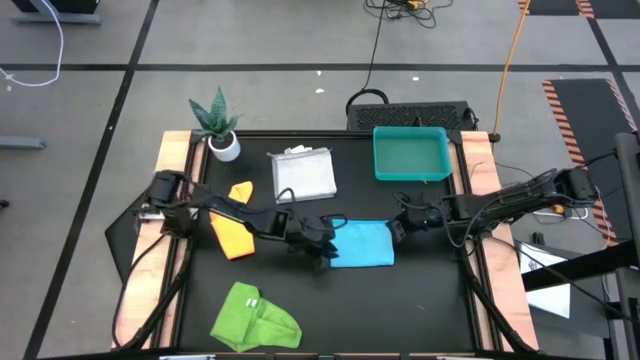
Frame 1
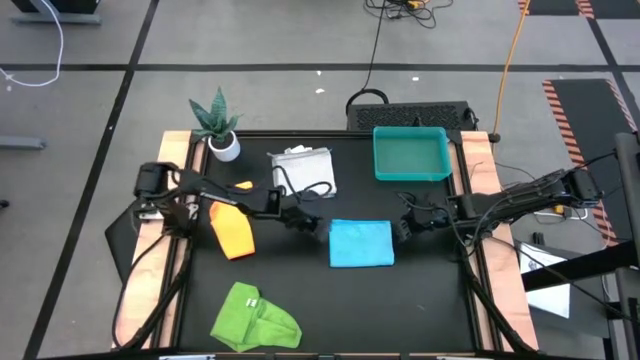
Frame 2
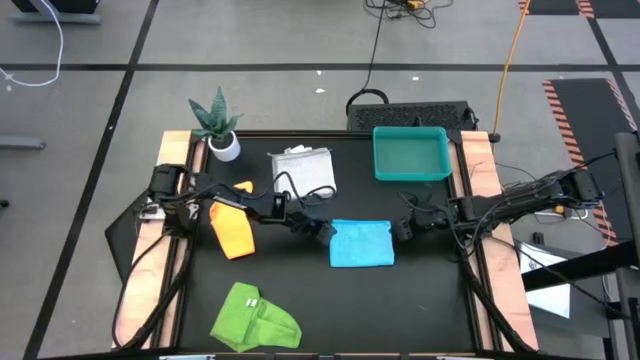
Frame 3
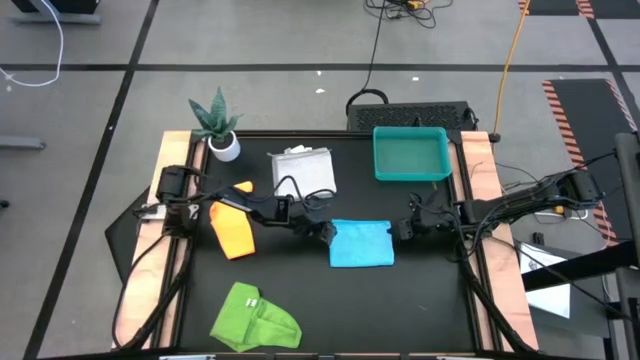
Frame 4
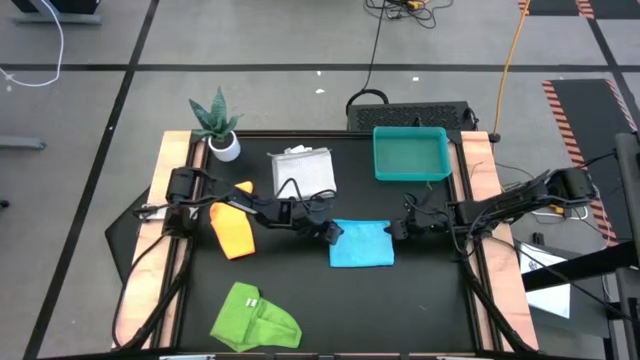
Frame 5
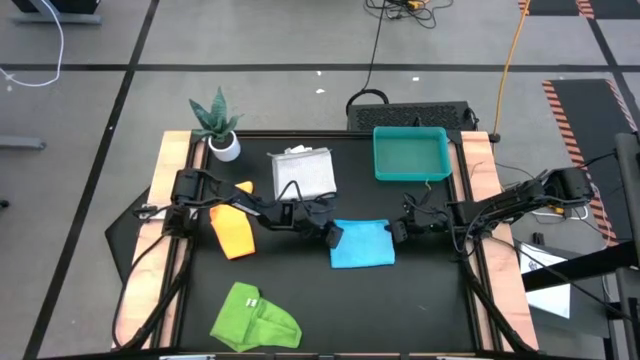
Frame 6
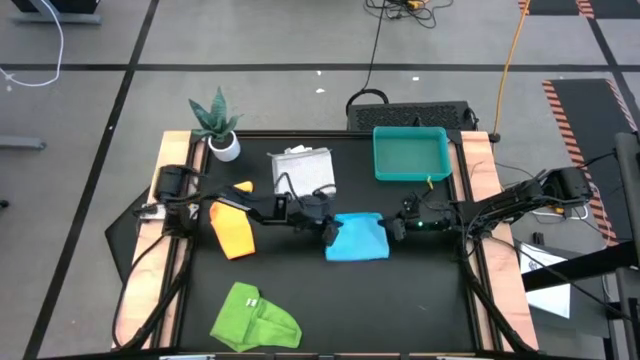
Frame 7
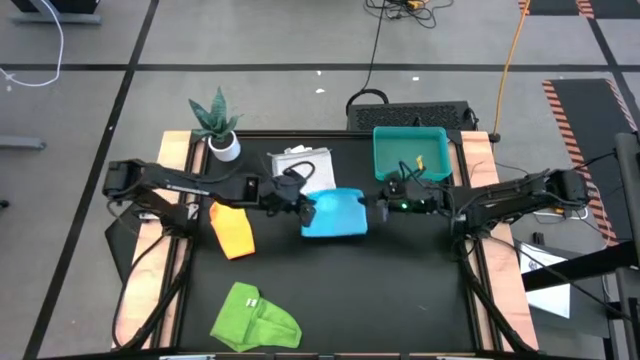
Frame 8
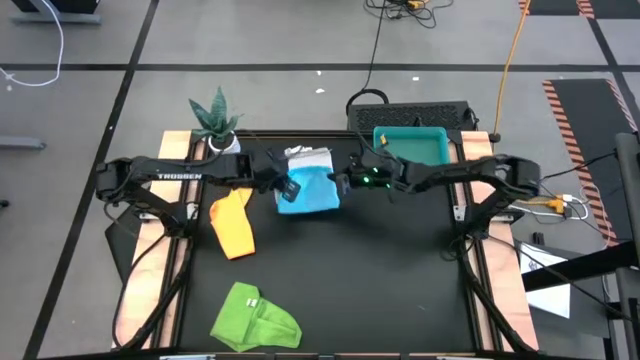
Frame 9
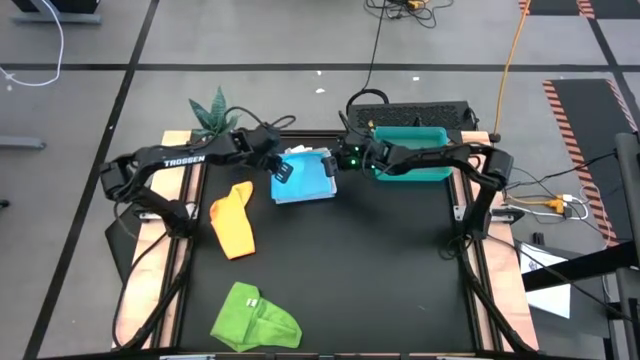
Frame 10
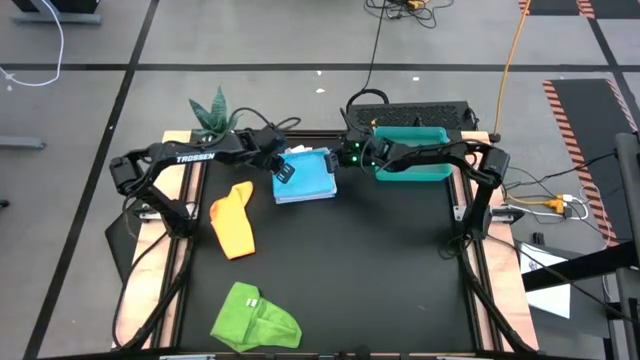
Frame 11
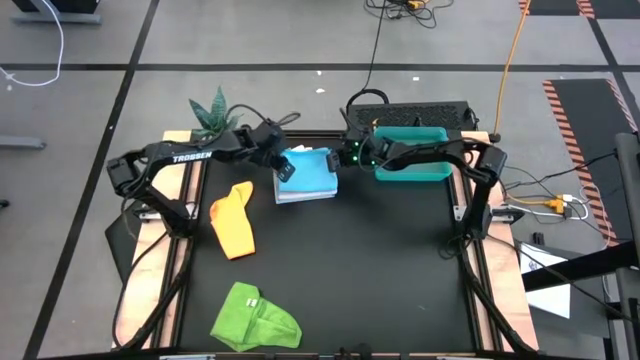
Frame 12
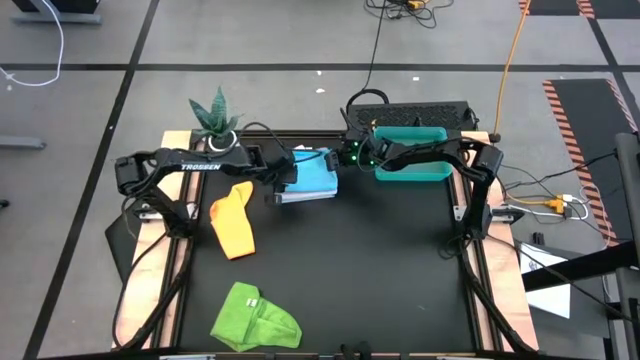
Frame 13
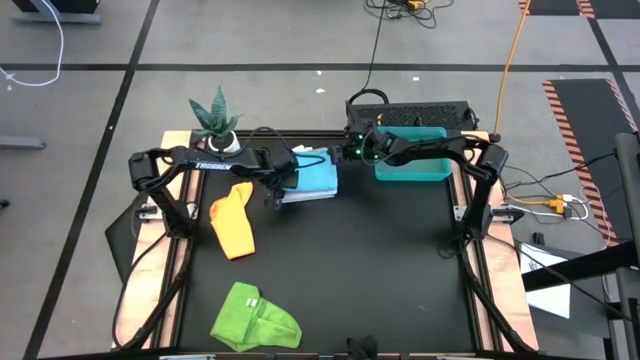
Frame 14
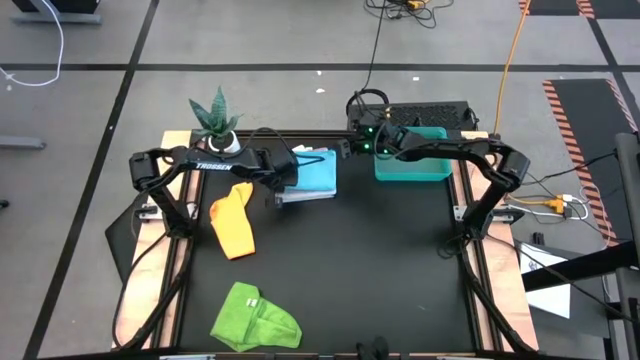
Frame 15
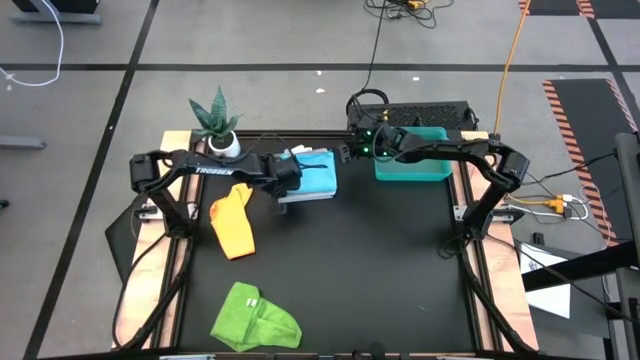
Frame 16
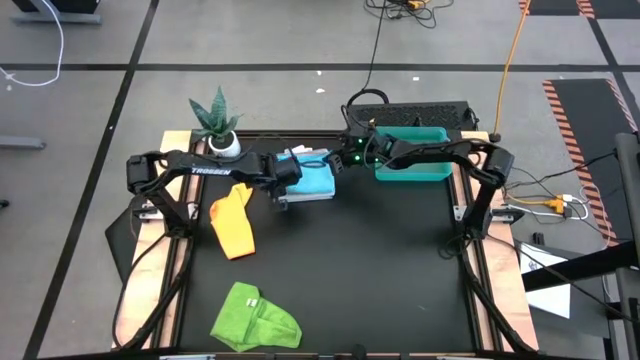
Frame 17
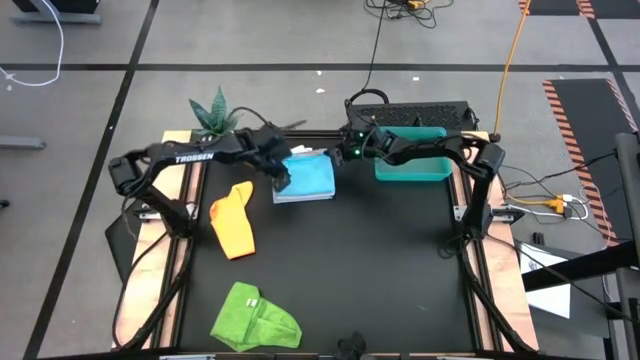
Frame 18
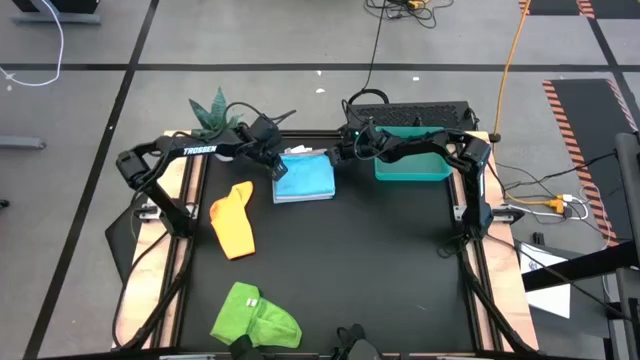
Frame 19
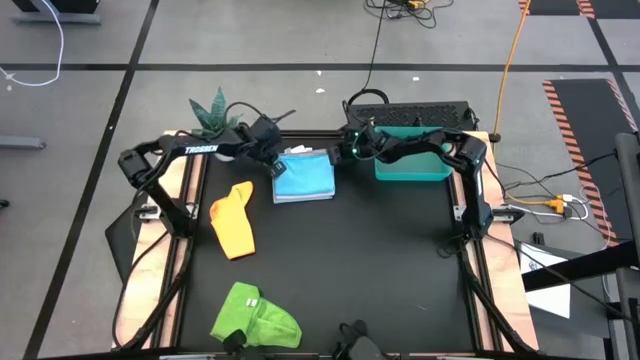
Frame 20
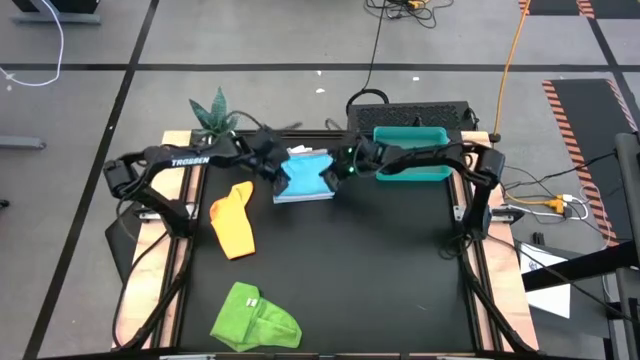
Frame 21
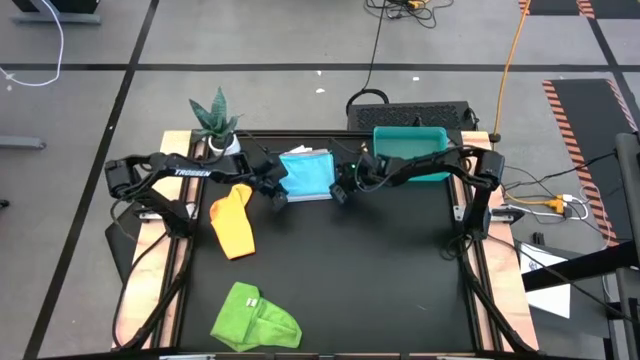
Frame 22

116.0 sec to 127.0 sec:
Task: Fold microfiber towels
Stack the blue microfiber towel on the gray microfiber towel

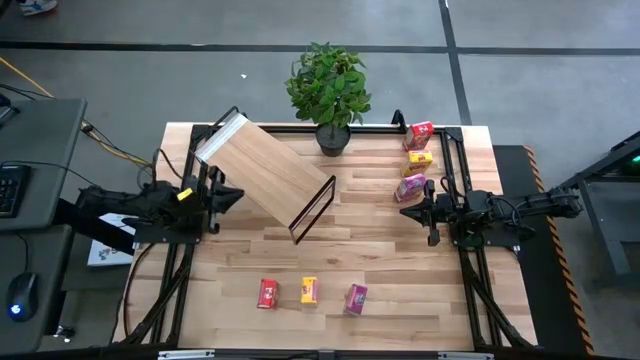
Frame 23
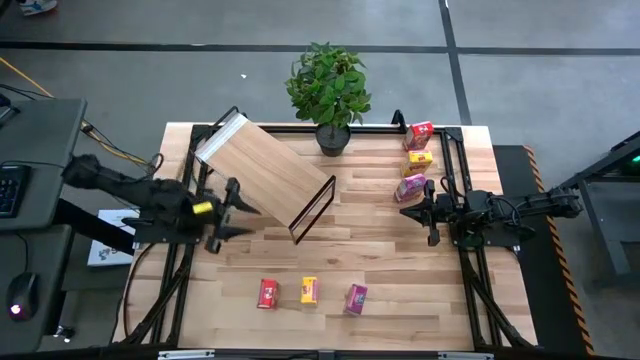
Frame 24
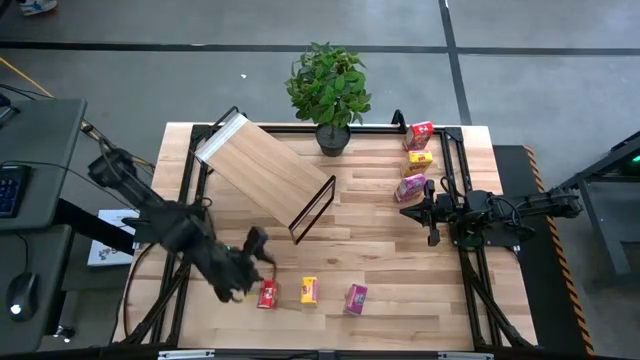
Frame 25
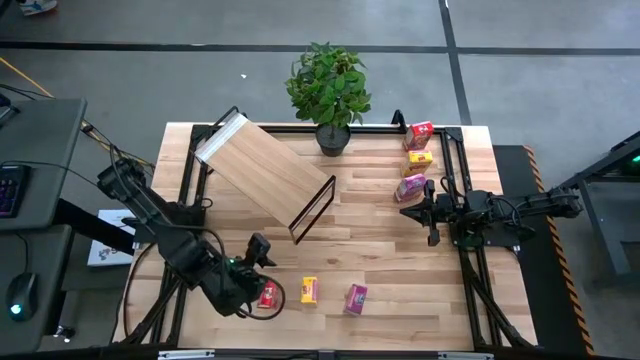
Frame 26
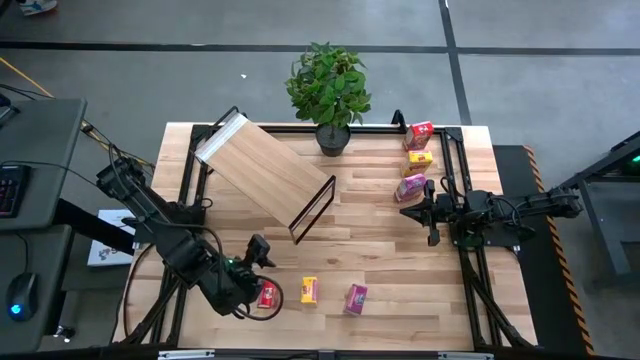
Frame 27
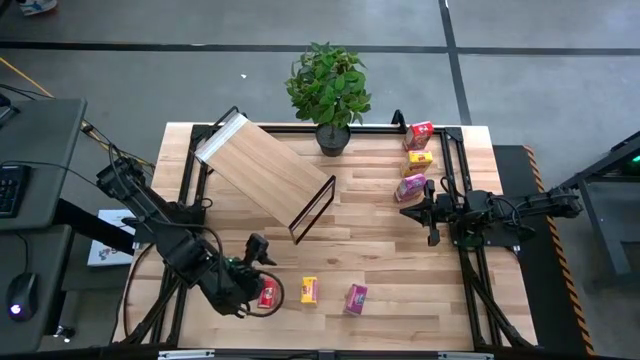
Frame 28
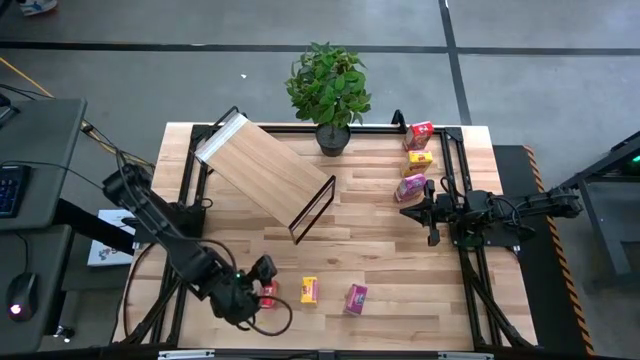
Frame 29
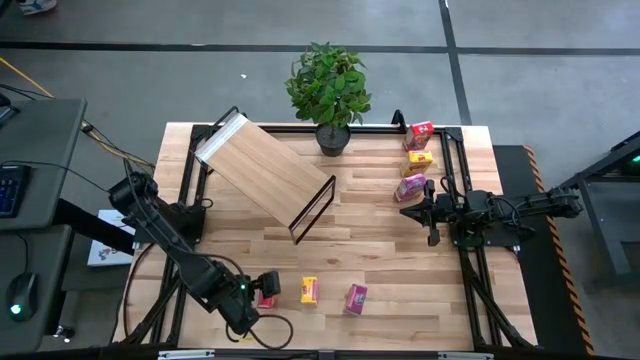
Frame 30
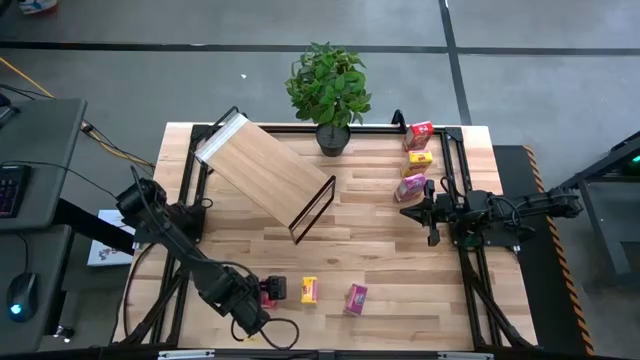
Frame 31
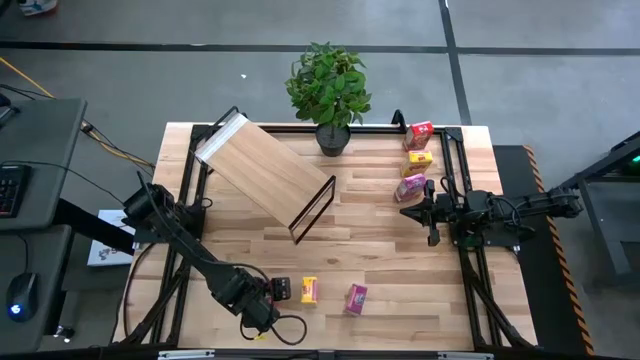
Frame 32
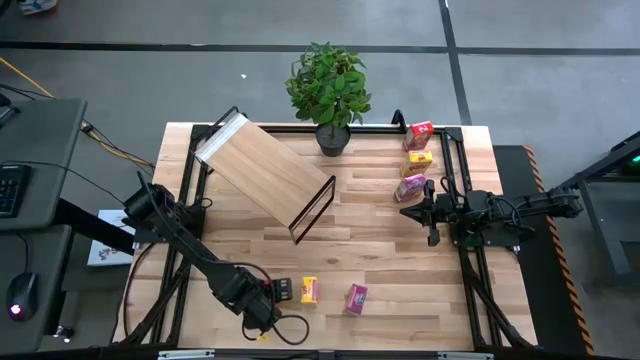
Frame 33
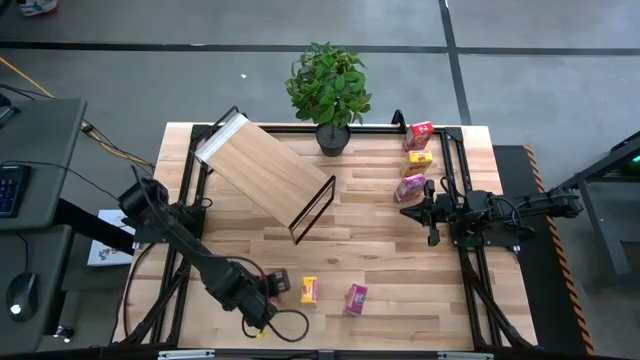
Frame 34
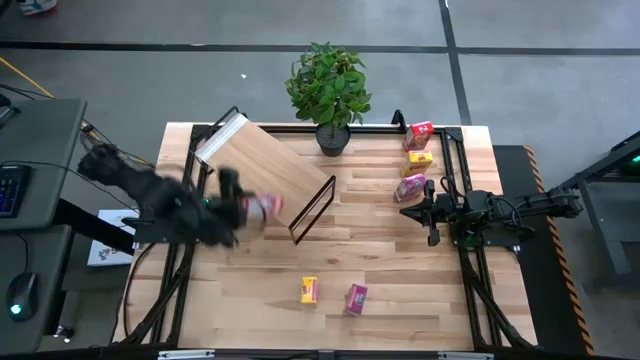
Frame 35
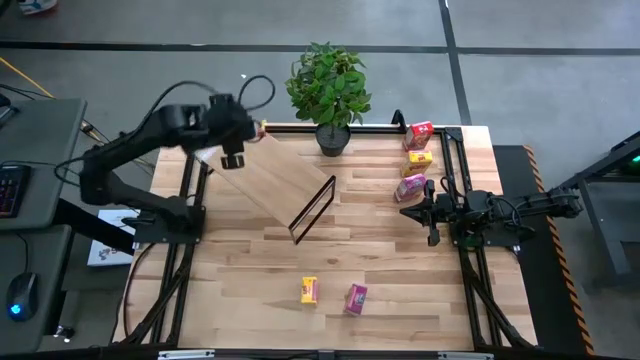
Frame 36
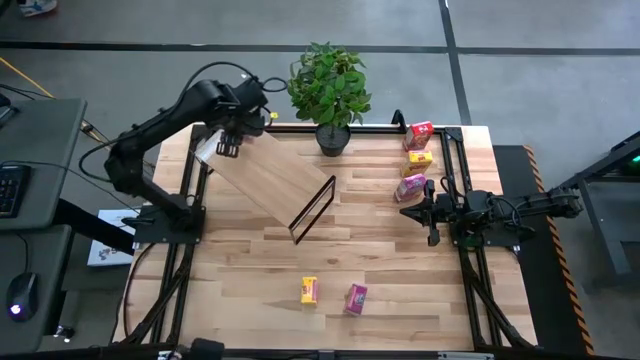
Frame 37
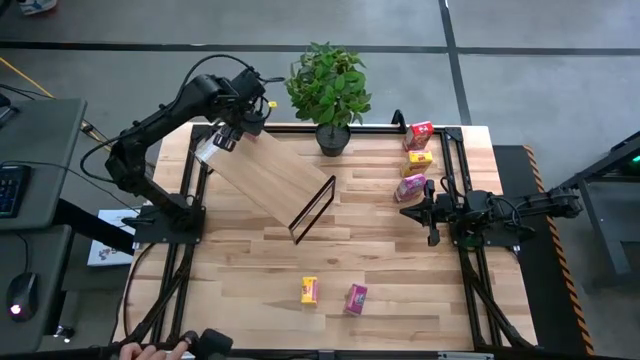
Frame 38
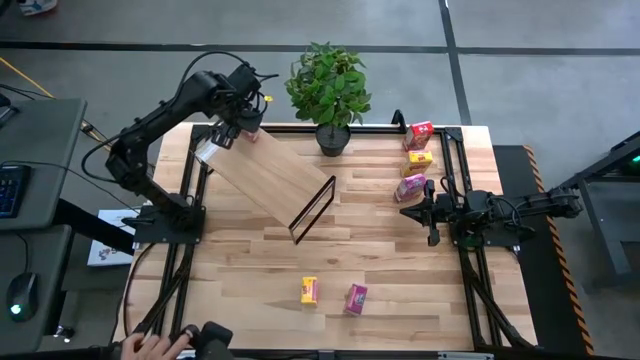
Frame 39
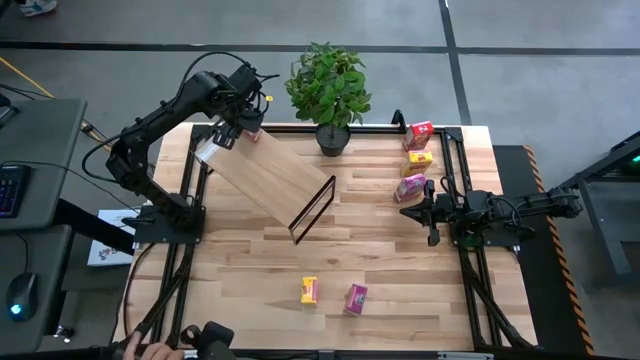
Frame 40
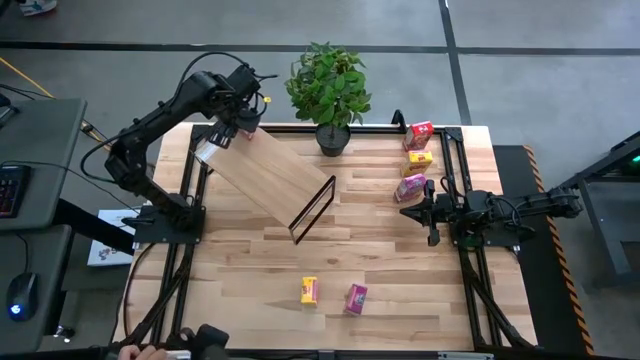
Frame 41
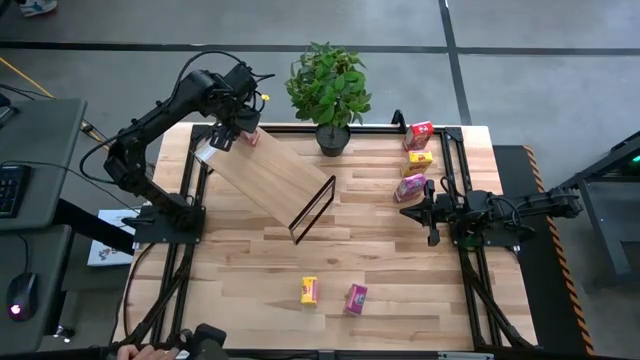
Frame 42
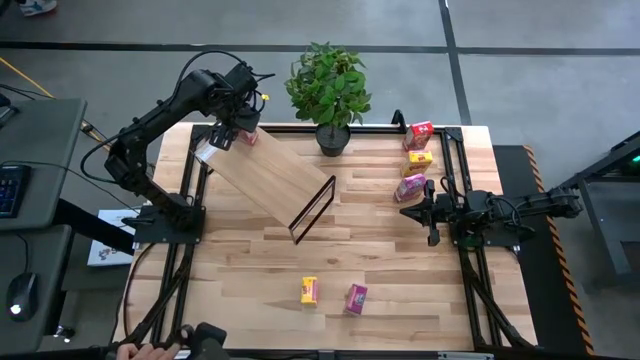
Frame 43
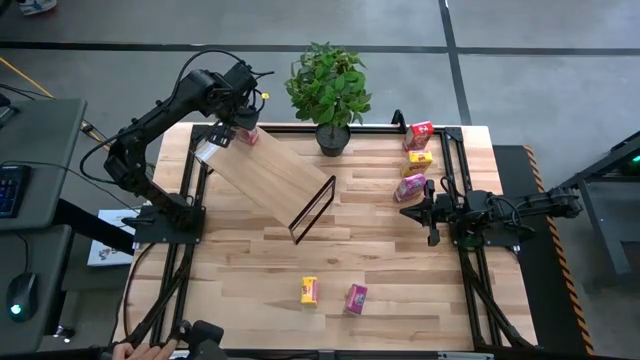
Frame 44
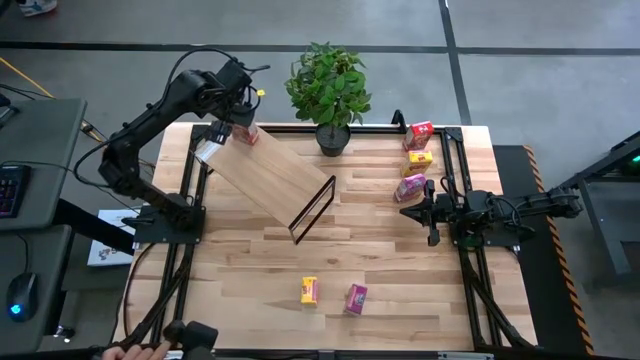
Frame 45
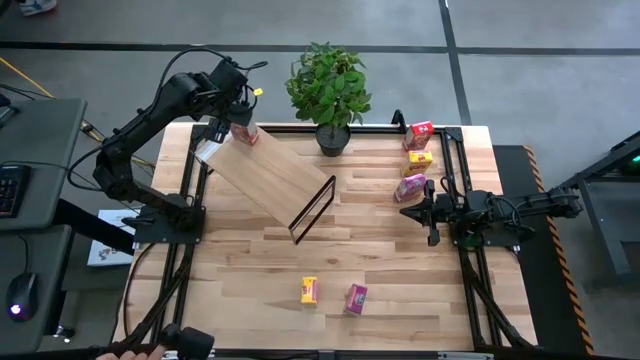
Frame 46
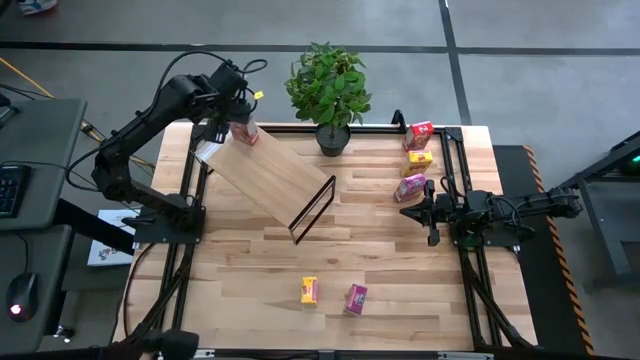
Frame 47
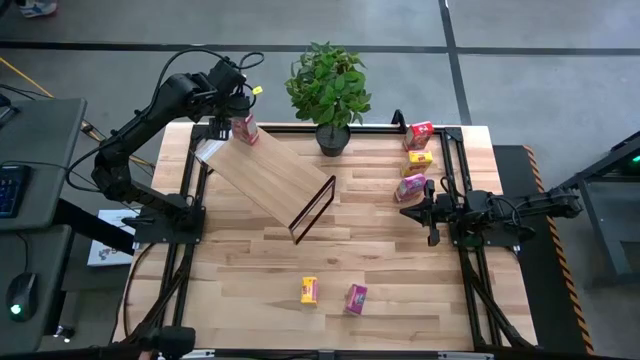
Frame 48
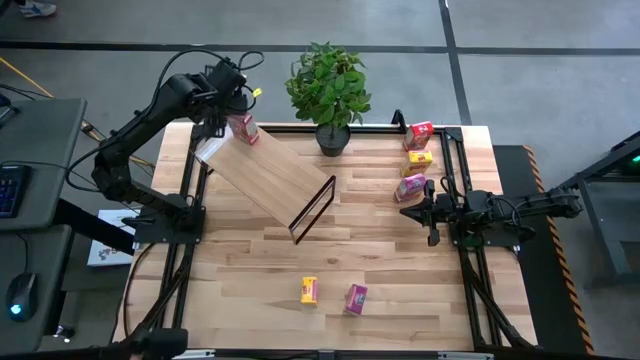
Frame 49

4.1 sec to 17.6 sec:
Task: Stack cereal on shelf
Put the bottom red cereal box on the shelf
